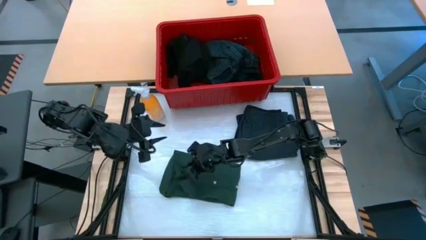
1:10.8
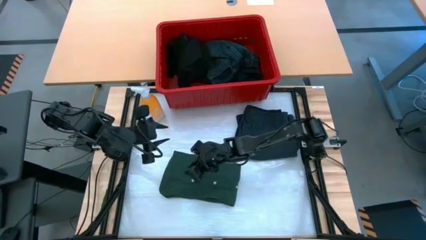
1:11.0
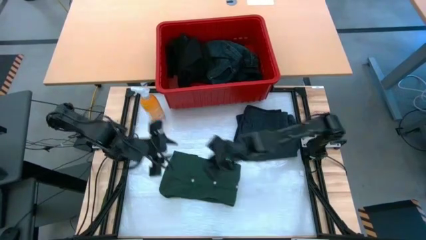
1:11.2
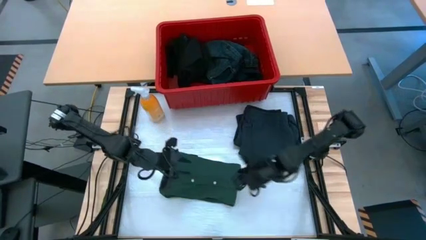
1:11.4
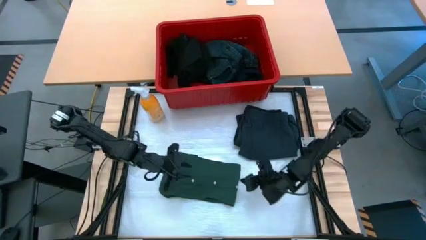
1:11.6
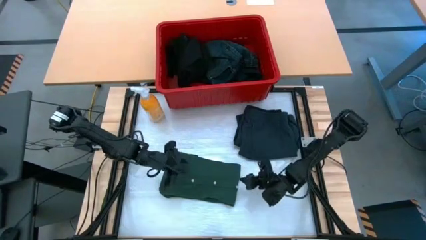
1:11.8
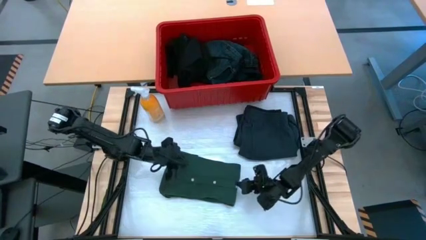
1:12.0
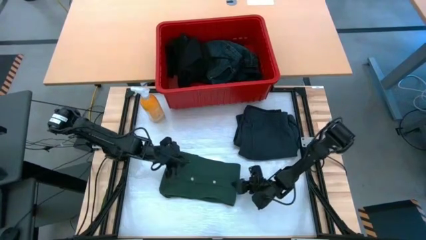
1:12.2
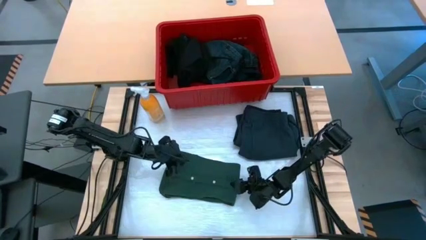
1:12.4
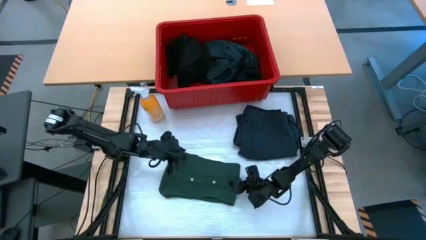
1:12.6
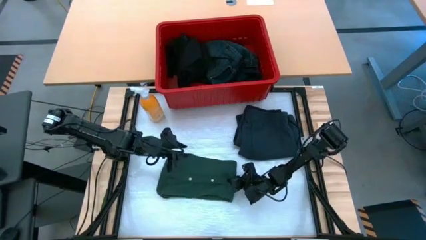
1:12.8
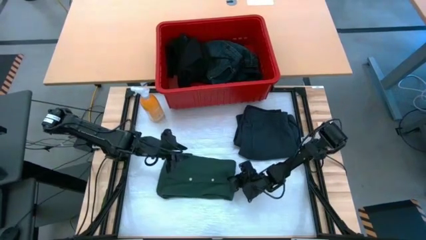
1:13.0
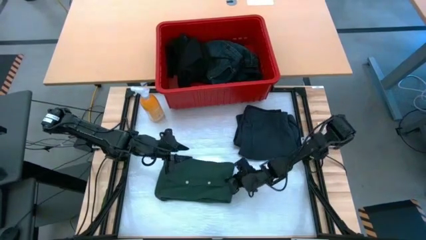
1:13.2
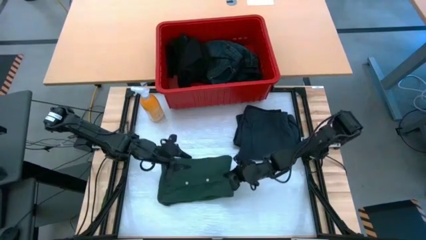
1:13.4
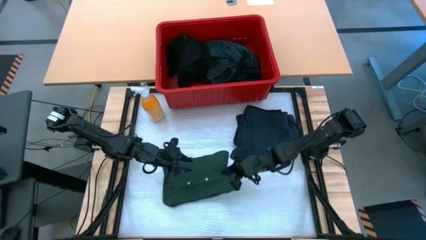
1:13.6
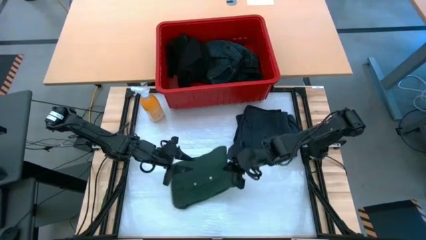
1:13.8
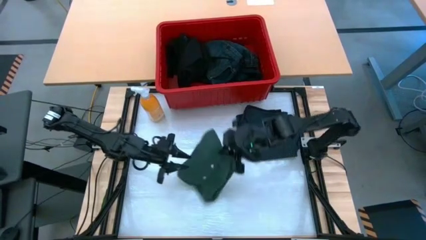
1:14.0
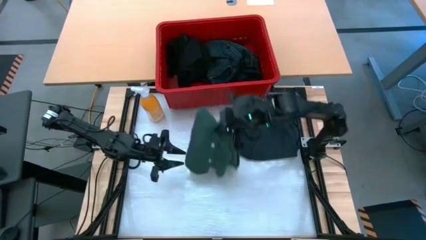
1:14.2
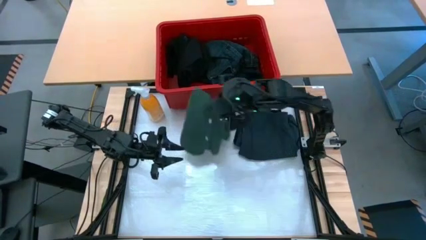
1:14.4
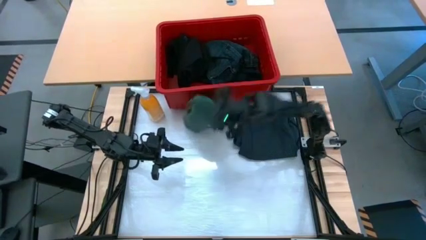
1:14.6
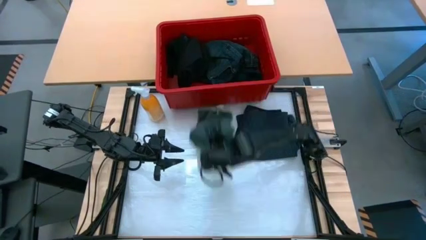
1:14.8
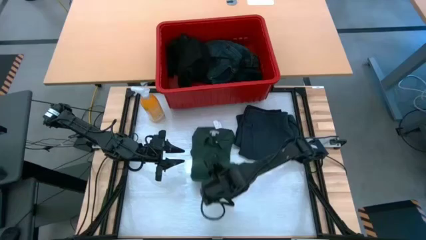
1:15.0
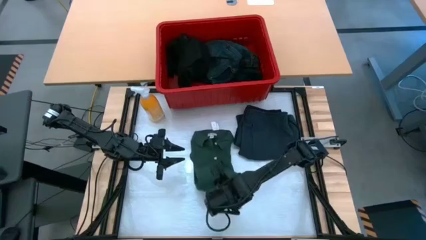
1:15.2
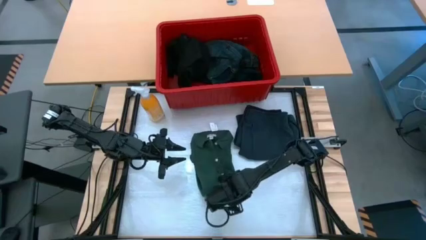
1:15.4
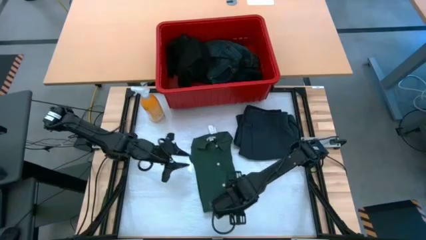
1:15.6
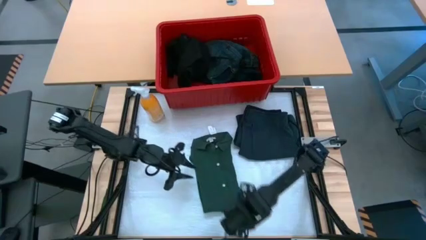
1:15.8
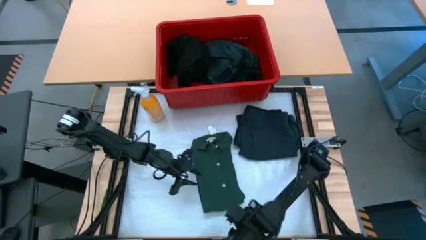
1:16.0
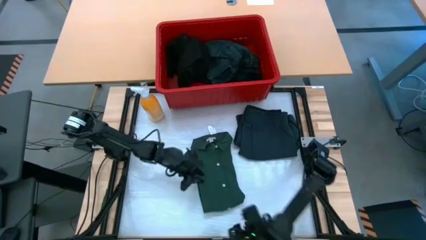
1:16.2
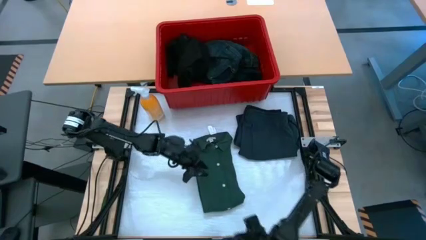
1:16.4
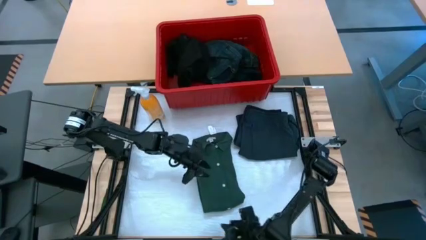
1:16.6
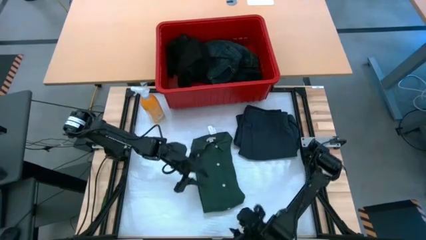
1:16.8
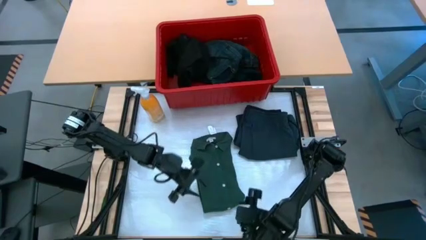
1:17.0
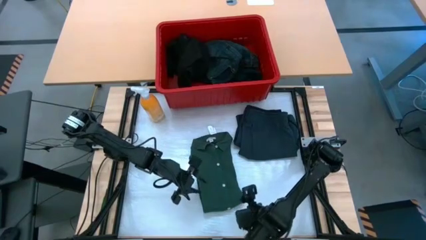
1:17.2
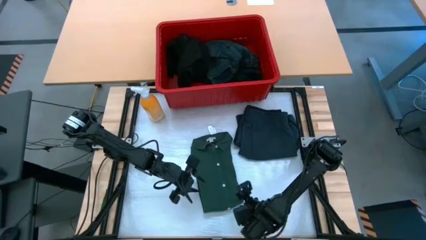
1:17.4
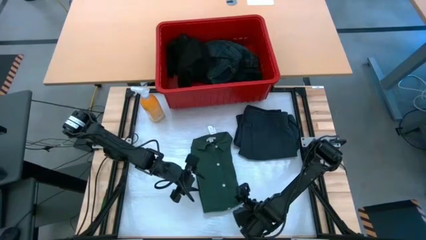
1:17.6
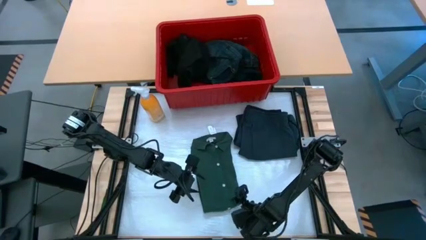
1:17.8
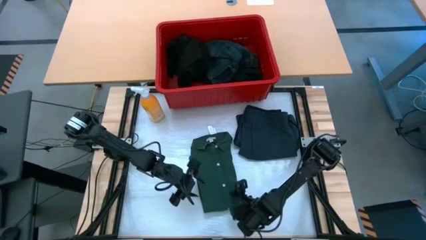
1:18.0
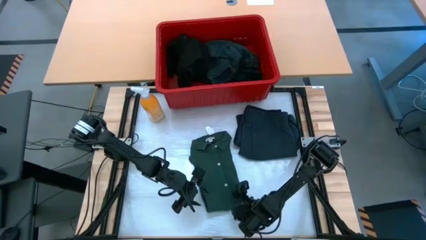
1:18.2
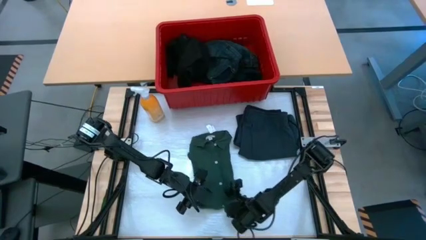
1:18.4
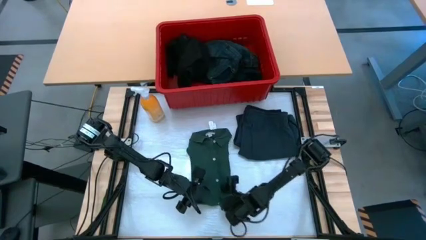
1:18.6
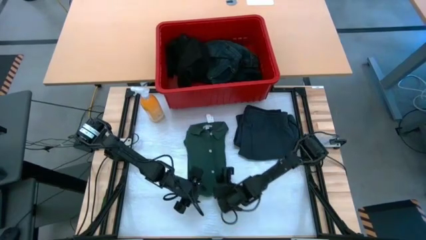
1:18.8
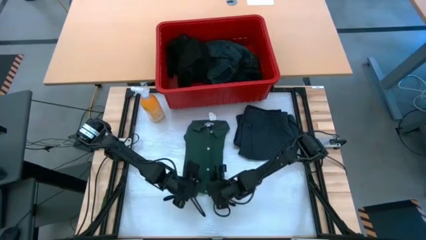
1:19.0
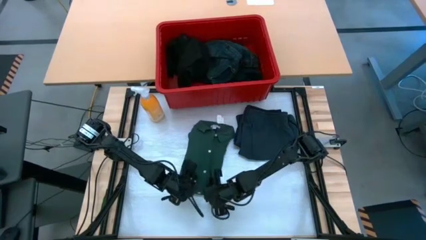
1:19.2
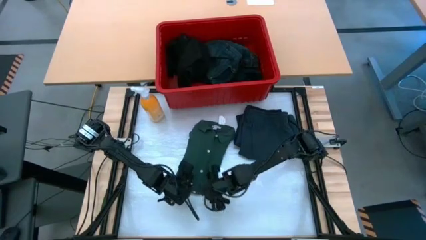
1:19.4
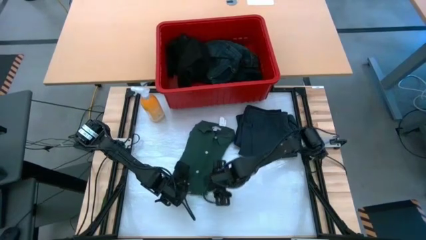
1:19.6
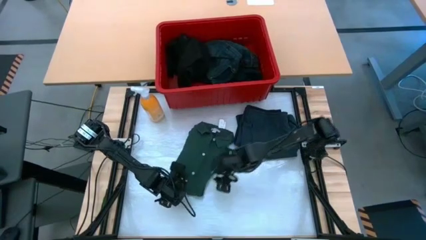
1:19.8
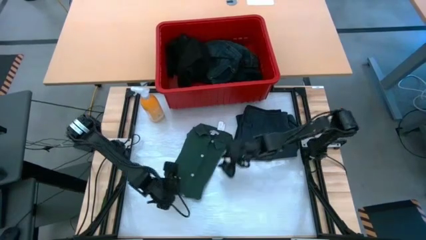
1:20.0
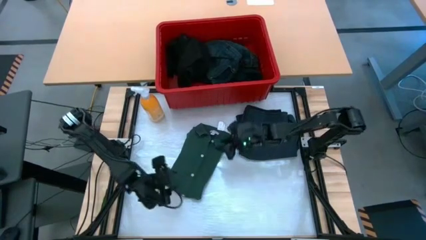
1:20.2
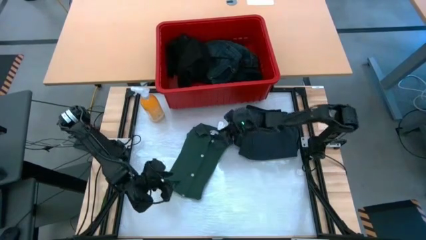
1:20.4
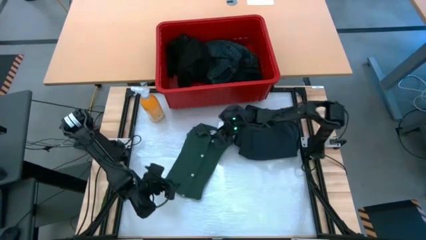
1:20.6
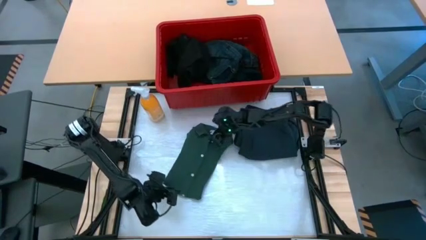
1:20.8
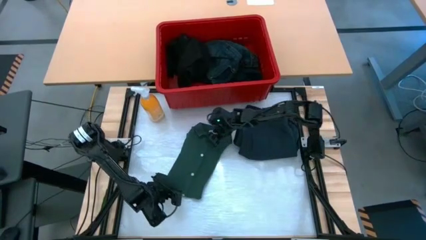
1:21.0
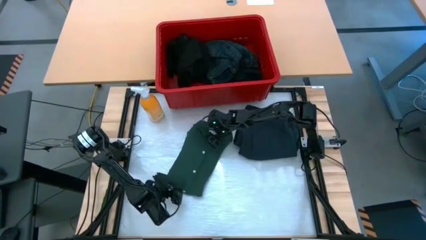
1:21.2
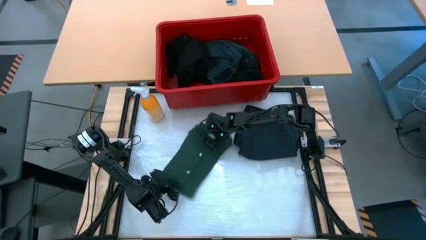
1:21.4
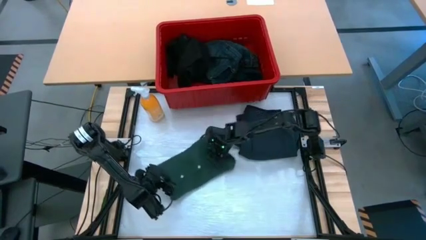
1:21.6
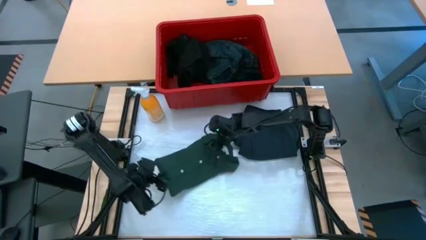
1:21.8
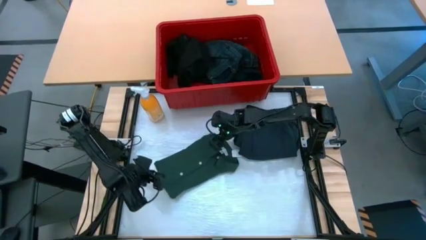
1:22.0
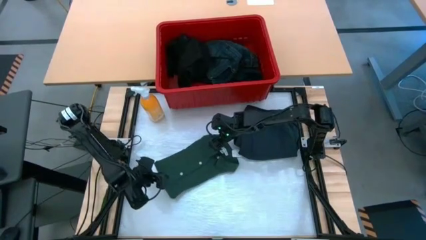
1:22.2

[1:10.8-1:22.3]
Task: Fold Laundry from Bin
Stack the green polo shirt on top of the black short

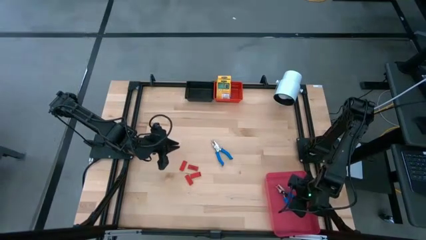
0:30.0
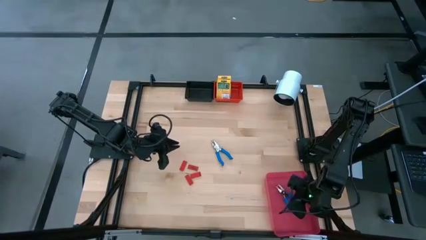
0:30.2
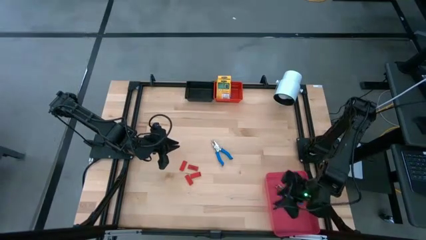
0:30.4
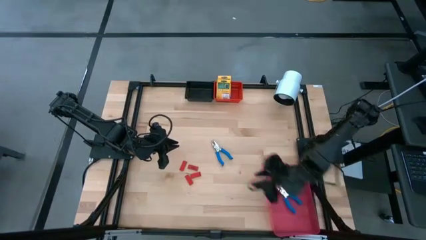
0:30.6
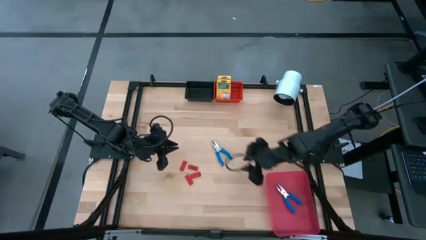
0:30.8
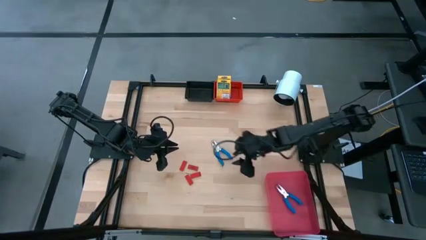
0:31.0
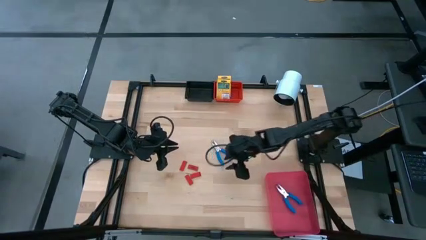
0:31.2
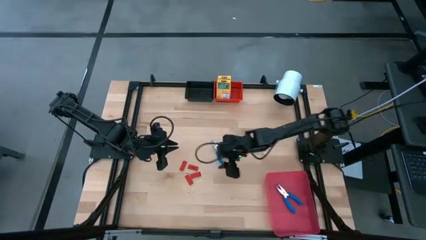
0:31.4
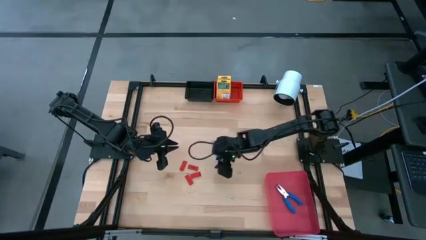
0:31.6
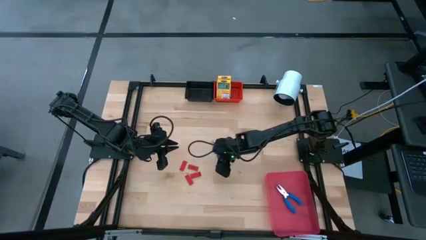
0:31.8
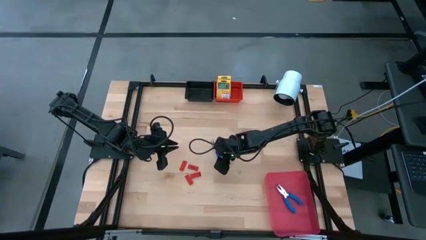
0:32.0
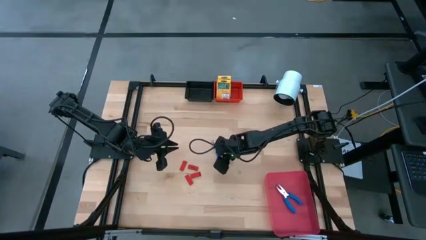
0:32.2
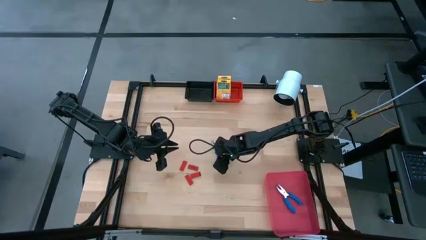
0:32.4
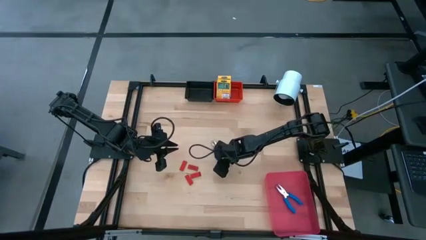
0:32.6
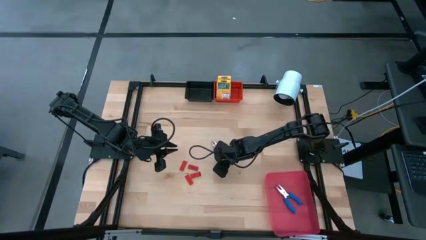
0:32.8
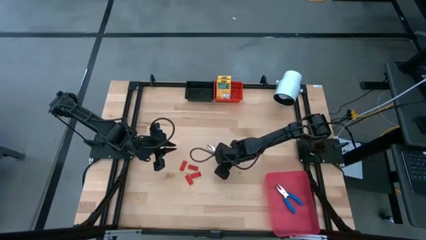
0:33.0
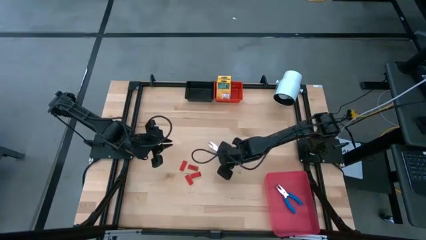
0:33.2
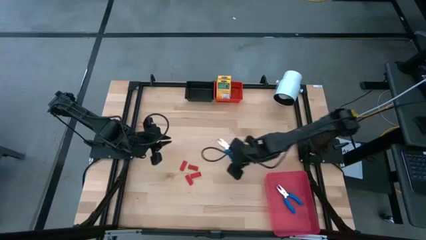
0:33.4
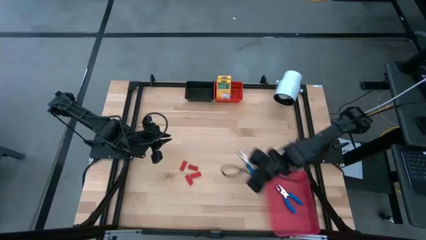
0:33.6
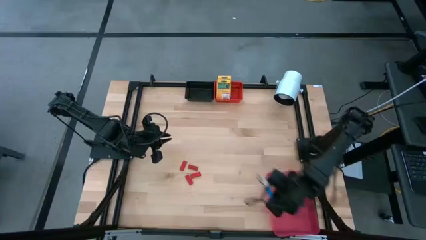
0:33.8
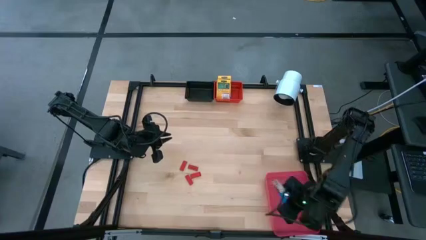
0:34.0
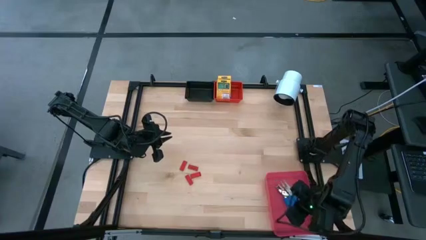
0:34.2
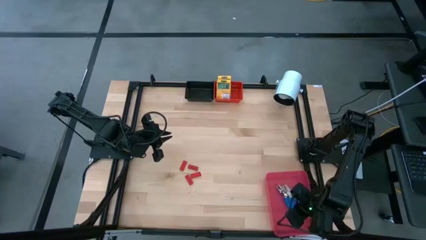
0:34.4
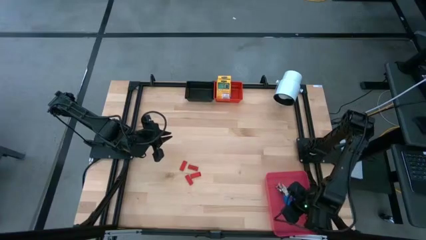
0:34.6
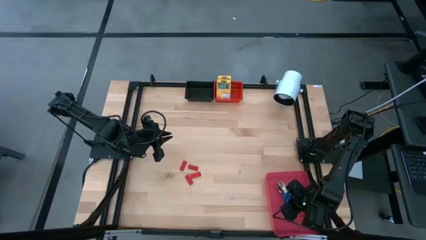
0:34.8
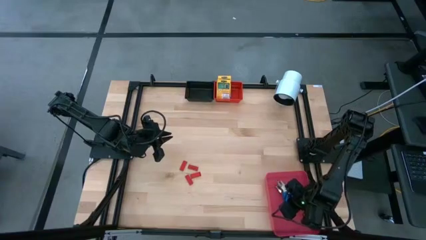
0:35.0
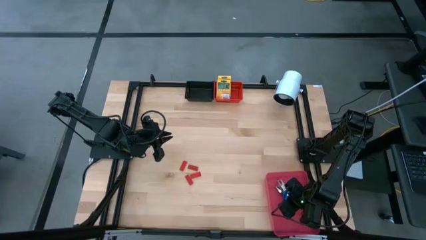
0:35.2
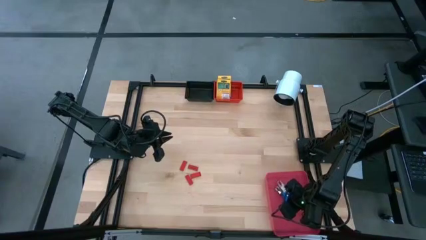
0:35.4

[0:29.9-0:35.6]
Task: Pick & Place School Supplies
Put the blue puncher into the pink bin
